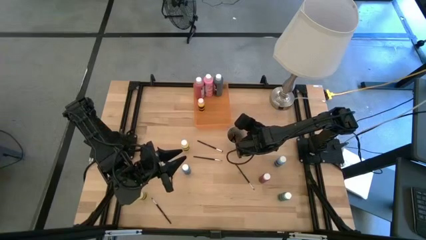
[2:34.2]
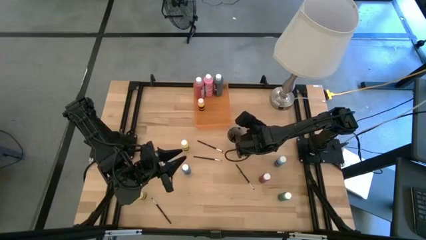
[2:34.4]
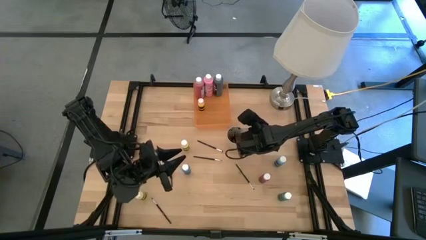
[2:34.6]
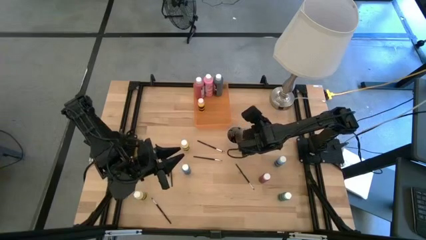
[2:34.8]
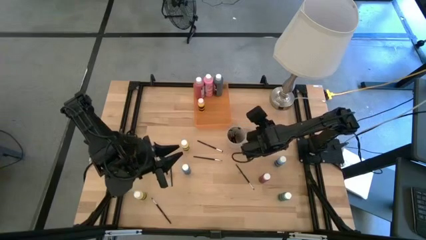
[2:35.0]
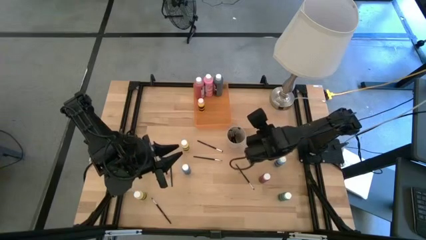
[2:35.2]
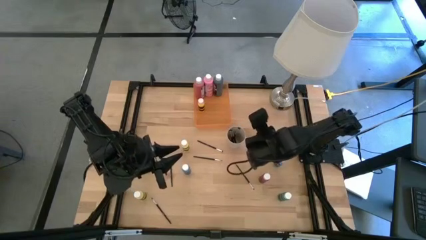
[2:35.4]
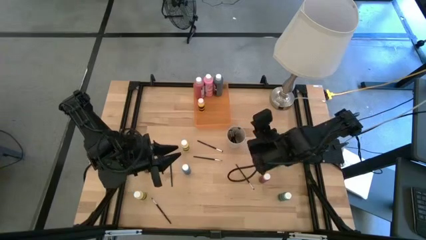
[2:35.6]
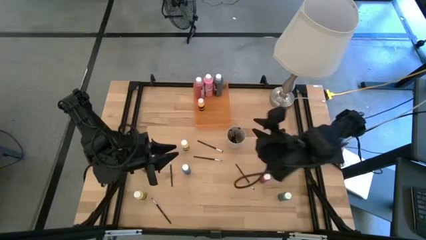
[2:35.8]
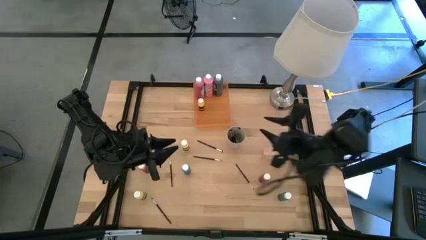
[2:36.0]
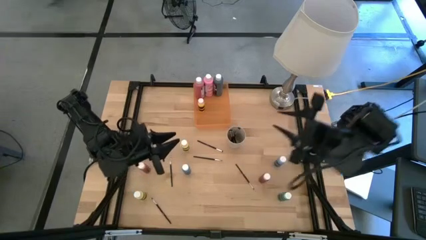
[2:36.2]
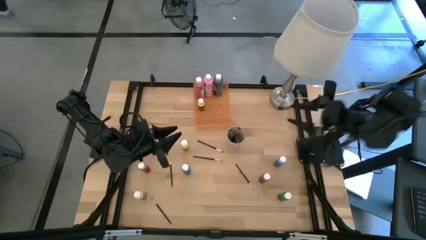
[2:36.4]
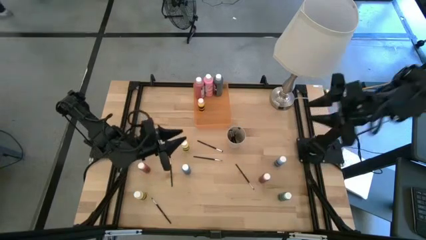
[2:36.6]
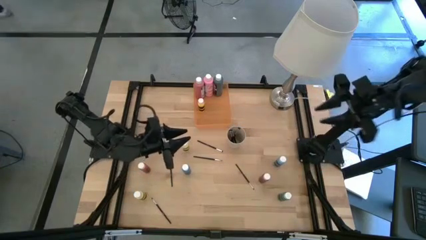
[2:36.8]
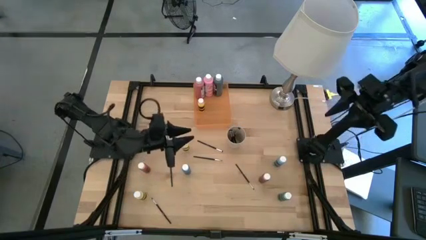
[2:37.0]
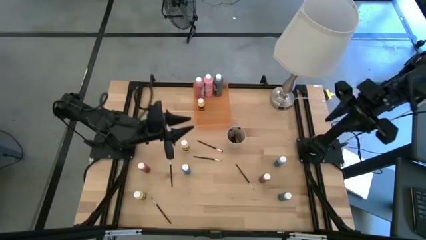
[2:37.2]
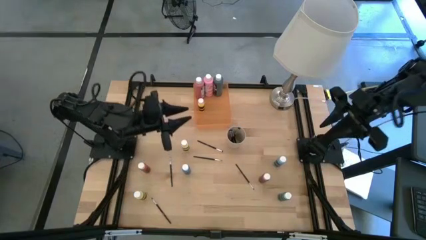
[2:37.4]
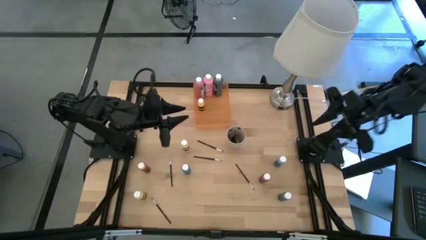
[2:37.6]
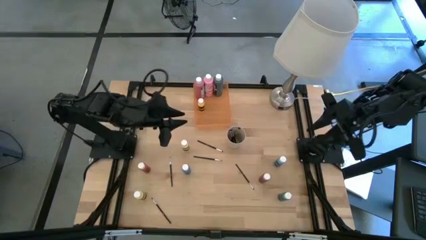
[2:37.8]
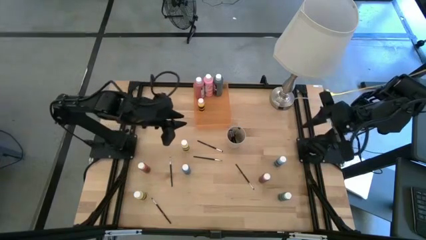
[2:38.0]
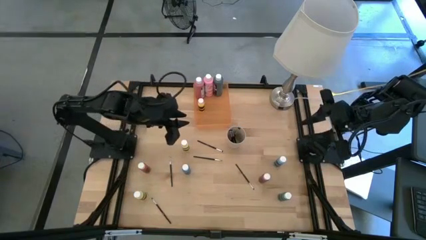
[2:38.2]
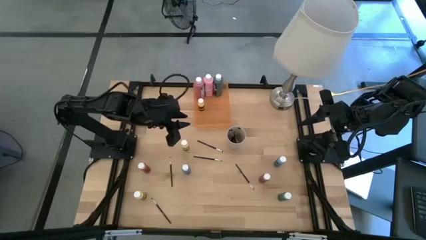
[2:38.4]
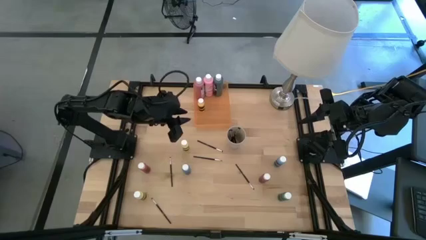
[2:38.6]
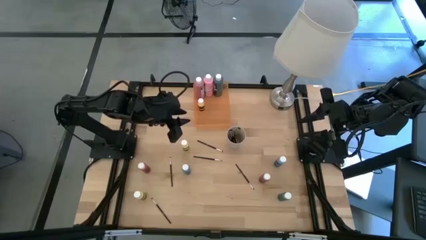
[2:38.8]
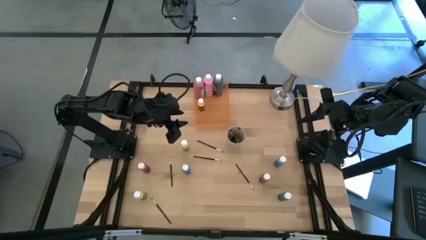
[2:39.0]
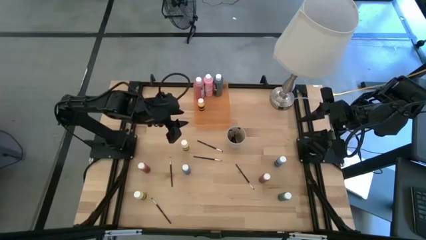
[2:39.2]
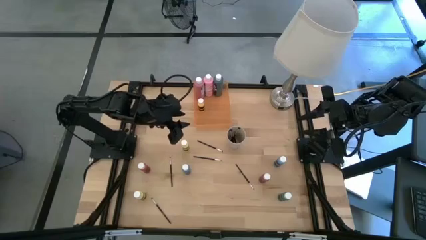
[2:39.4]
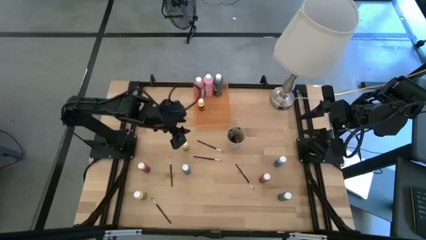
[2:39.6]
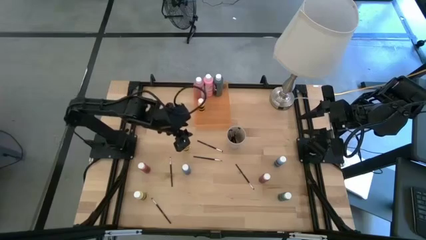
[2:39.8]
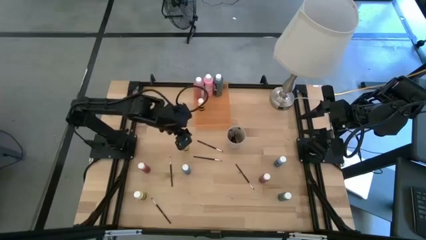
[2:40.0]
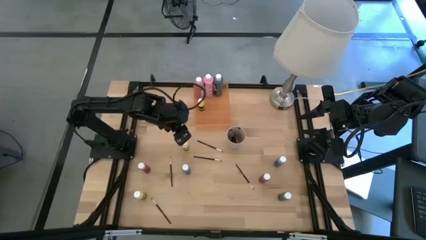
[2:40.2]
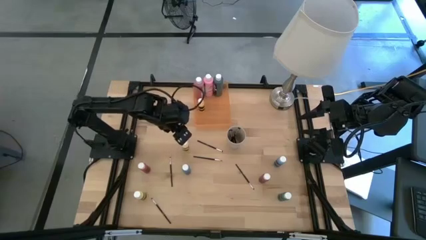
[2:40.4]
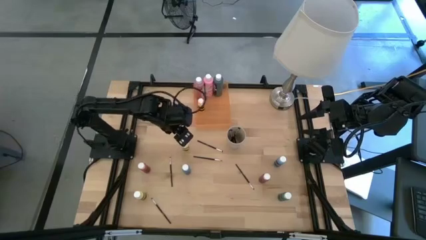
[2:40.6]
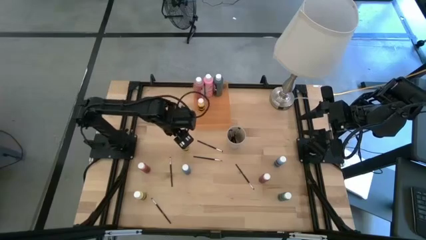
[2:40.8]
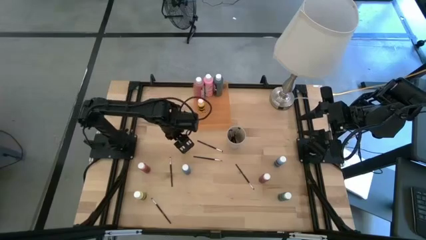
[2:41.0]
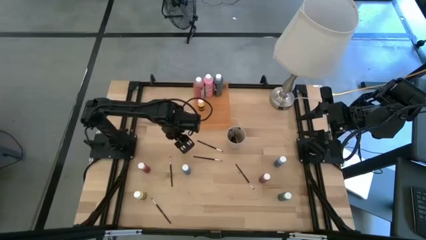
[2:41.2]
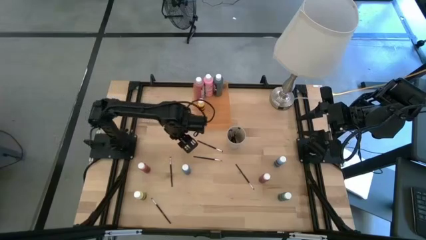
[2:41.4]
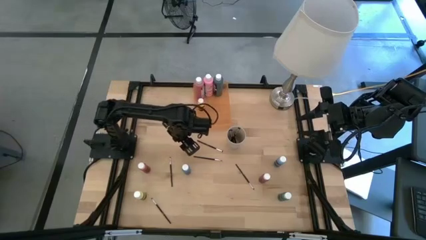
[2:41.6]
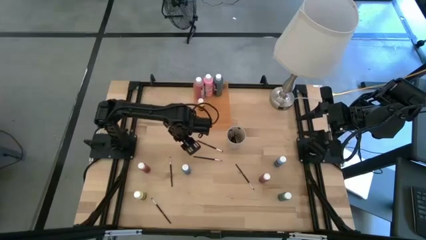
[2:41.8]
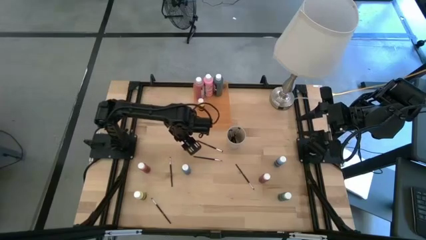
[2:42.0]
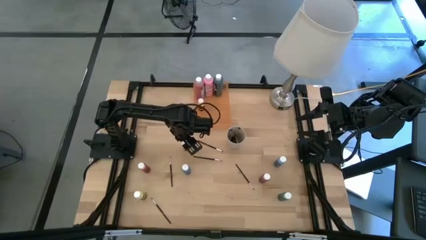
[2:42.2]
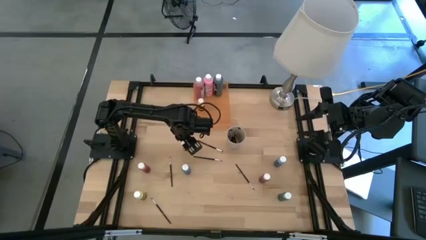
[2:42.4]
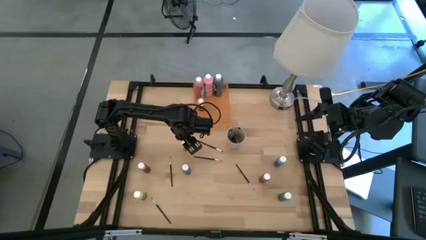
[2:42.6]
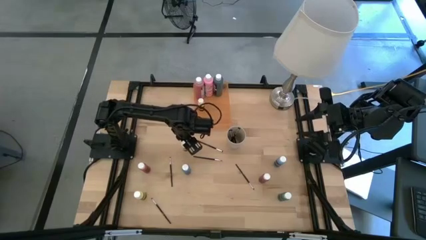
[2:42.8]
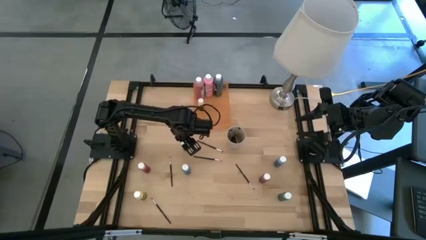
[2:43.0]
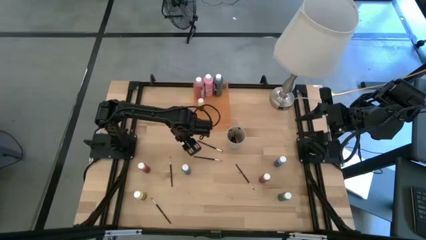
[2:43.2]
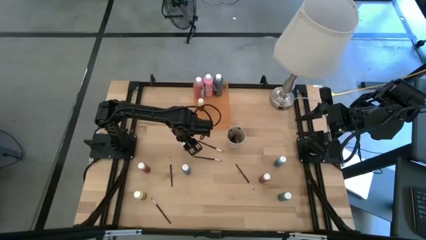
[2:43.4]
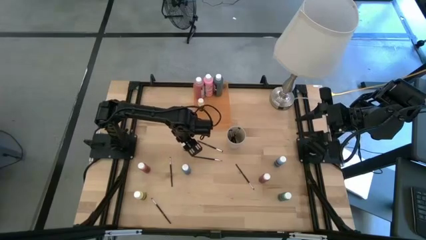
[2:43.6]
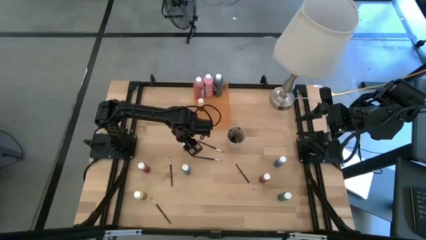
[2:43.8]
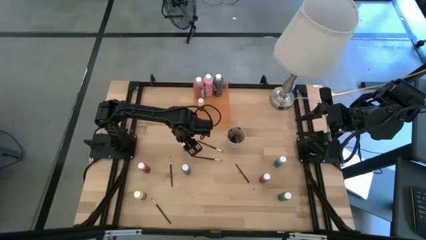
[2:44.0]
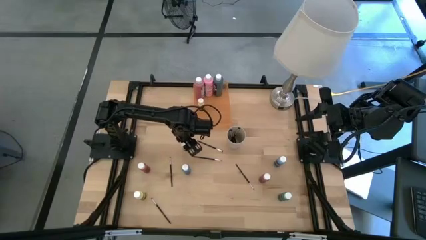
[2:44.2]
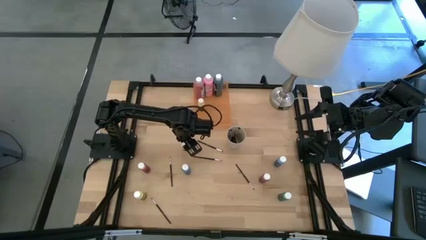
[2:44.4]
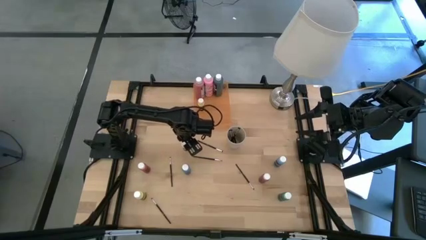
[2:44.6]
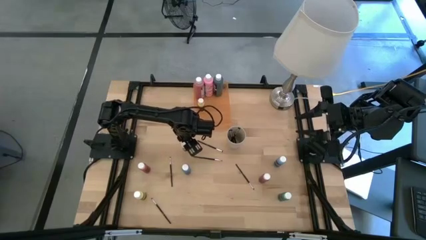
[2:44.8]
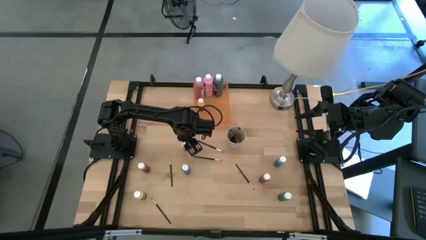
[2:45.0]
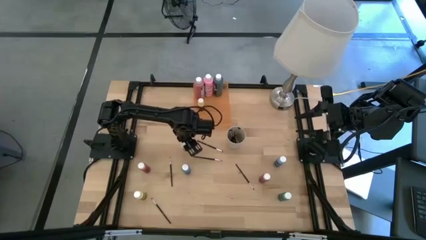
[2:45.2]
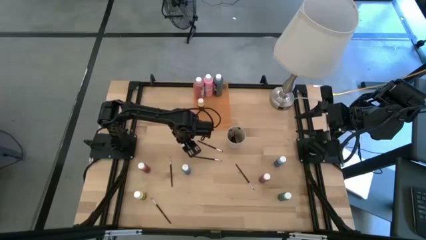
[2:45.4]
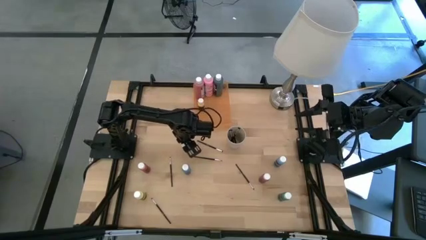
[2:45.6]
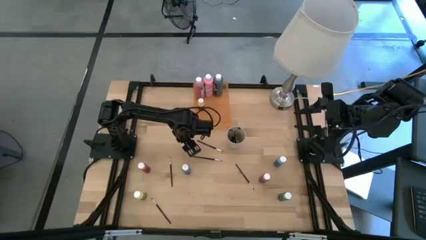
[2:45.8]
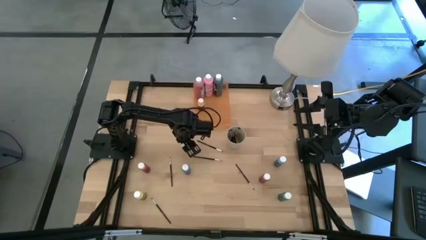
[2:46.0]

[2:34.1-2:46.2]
Task: Pick & Place Paint Supplies
Put the light yellow paint bottle into the orange bin

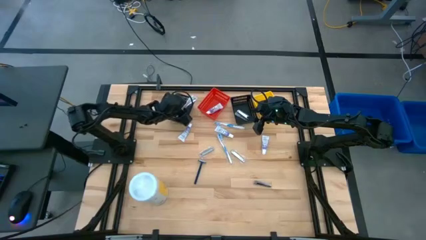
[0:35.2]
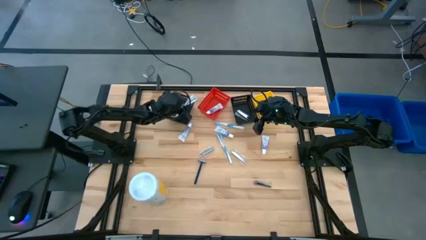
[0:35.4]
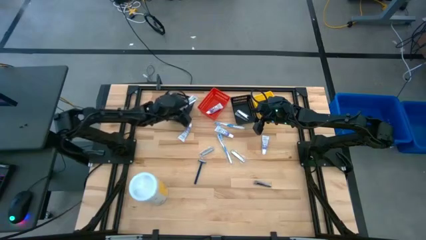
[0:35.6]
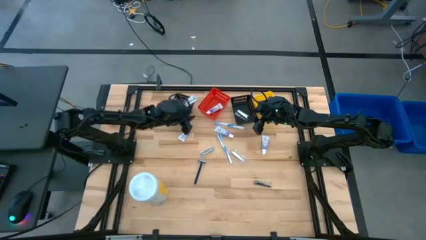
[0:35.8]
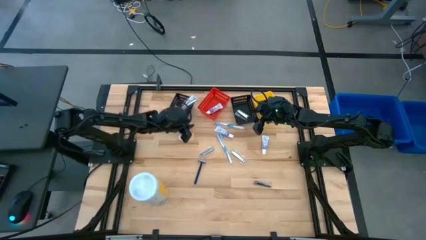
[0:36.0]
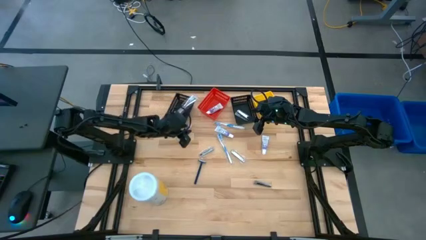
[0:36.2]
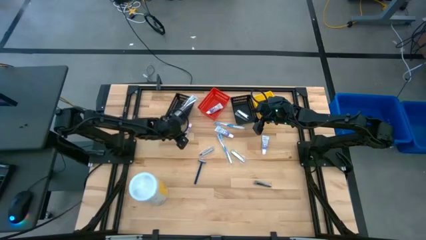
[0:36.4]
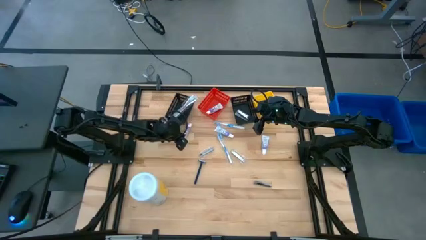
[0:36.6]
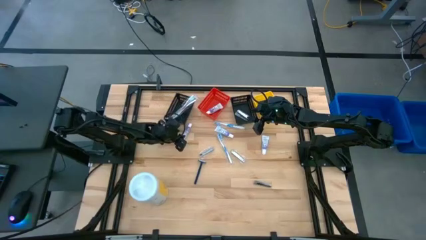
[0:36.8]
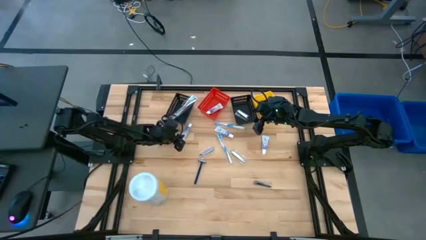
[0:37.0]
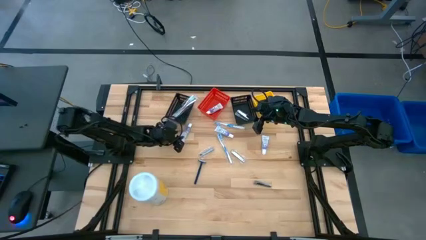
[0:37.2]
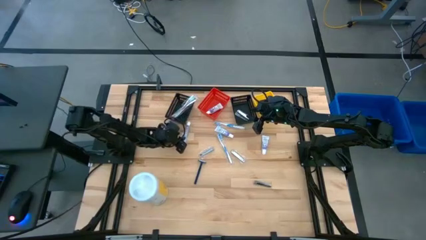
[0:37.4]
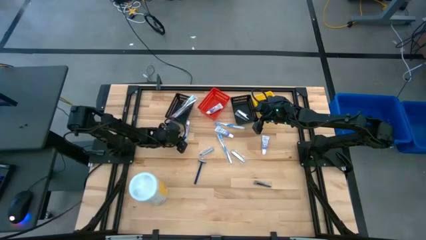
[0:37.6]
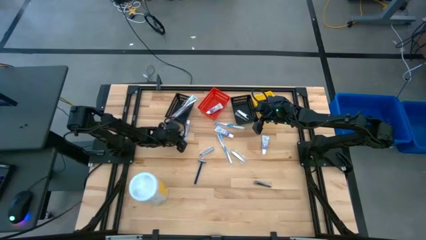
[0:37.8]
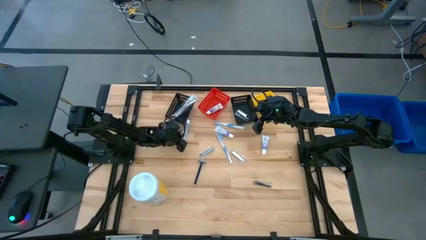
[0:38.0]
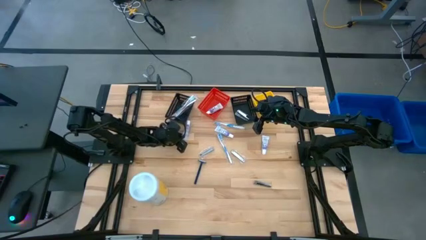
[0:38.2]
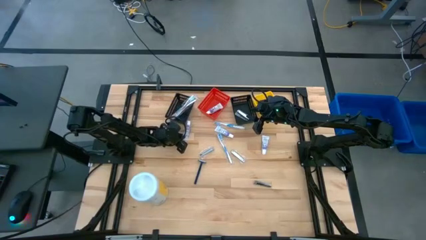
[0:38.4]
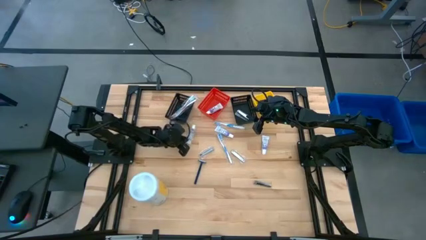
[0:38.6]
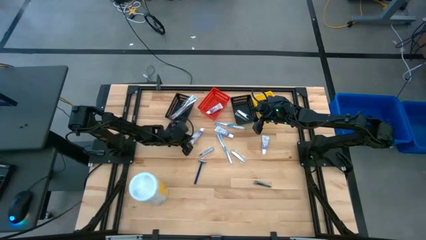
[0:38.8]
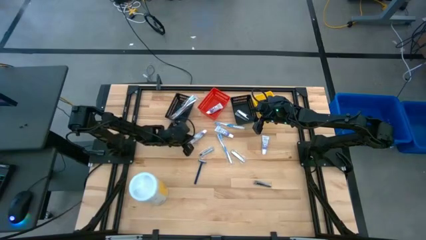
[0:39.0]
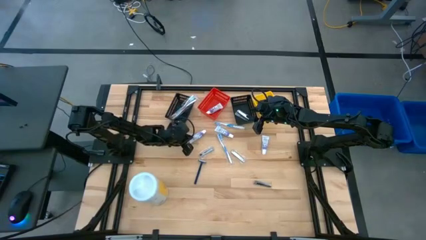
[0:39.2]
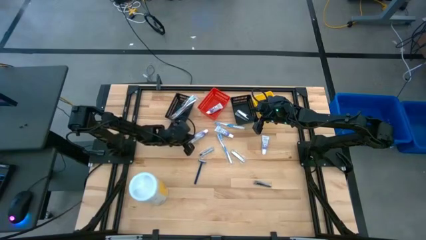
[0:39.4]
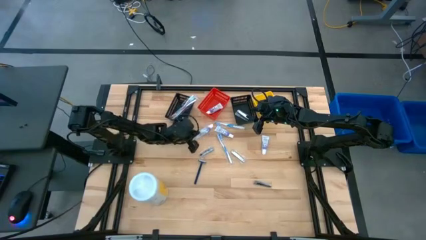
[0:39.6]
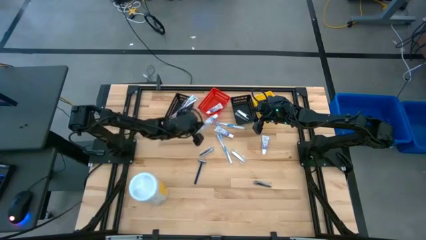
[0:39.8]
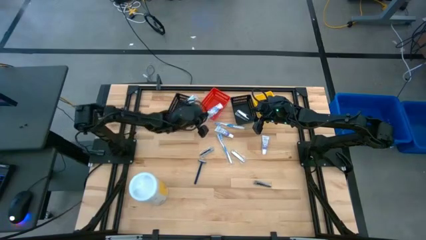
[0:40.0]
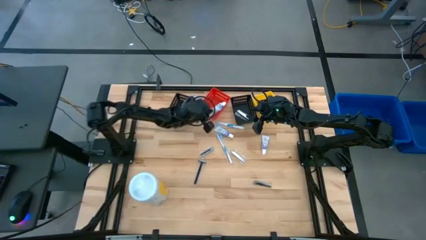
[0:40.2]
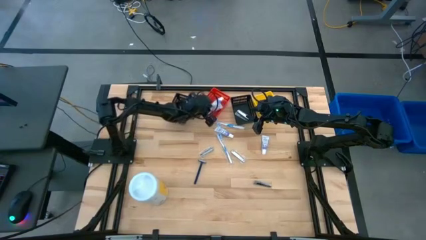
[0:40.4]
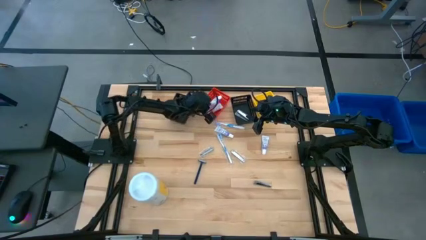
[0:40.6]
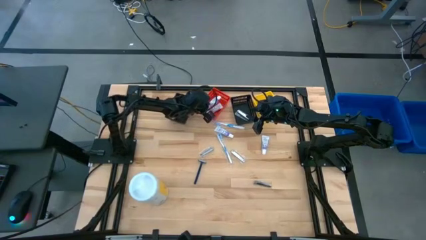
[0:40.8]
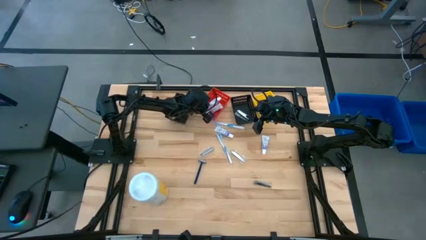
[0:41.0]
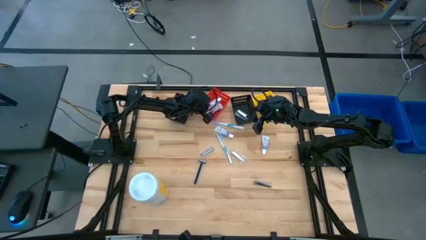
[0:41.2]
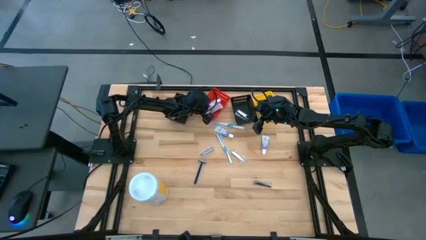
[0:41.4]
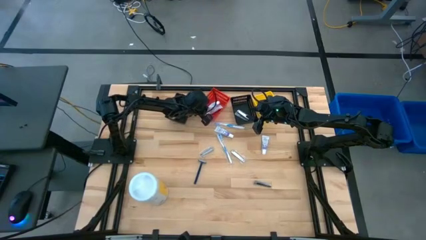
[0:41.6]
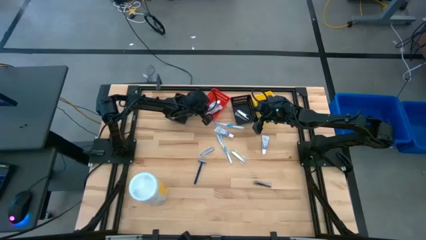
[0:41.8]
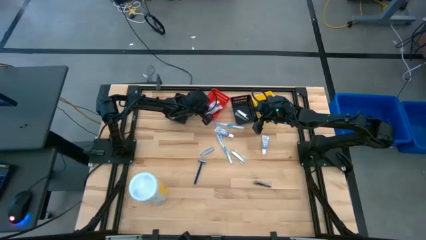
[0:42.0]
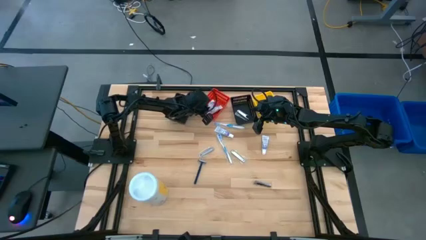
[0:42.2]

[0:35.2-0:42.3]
Task: Pick & Place Travel size toiletries
Put the toothpaste into the red bin
